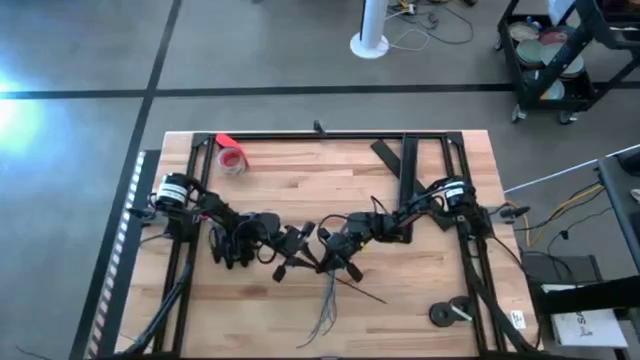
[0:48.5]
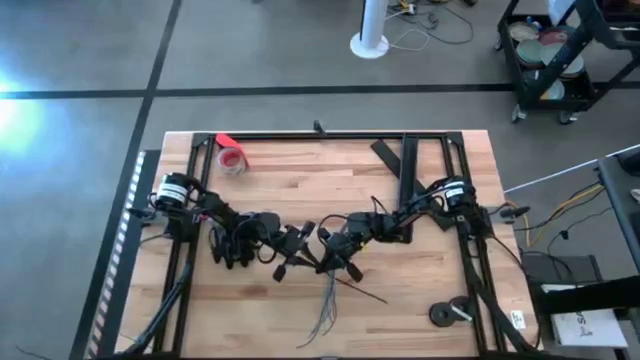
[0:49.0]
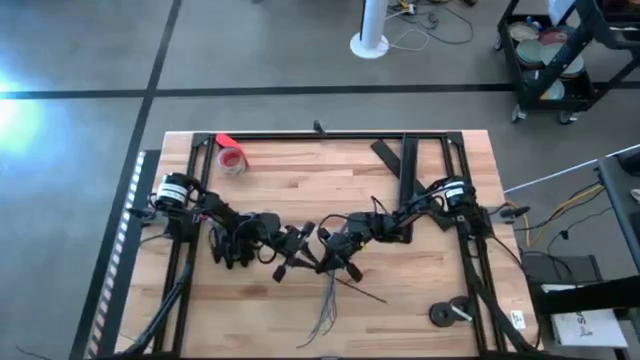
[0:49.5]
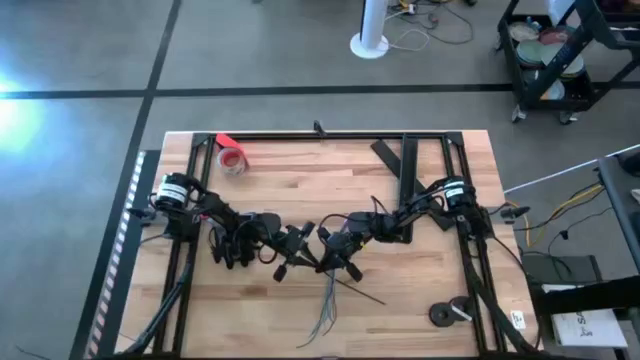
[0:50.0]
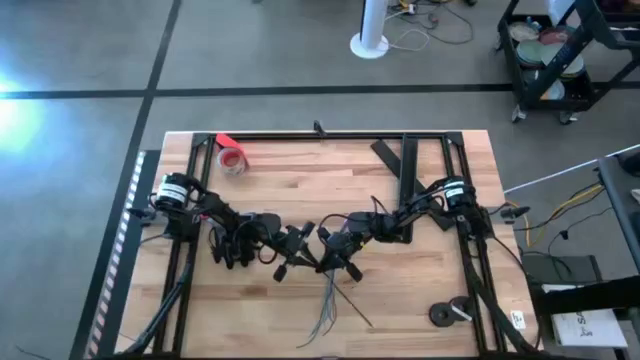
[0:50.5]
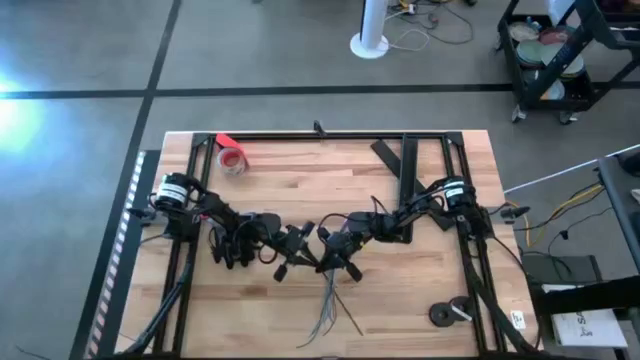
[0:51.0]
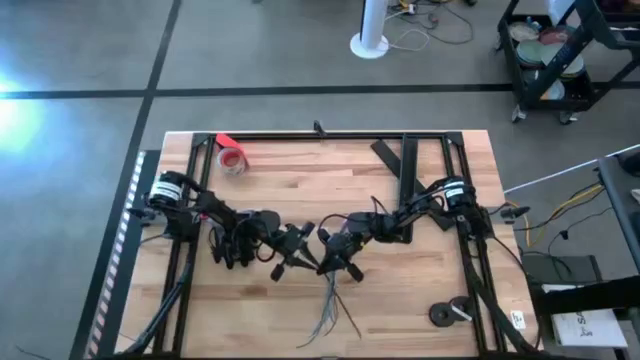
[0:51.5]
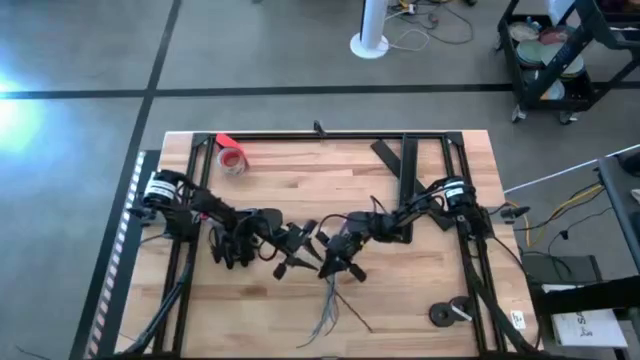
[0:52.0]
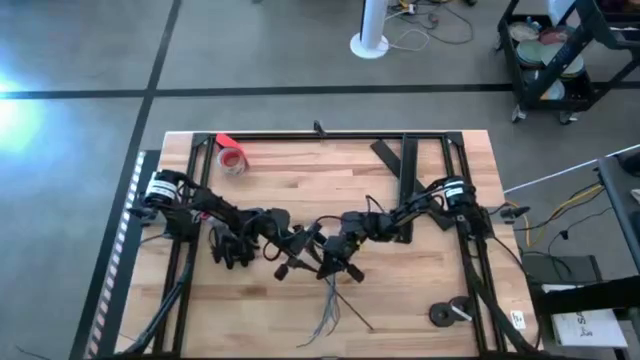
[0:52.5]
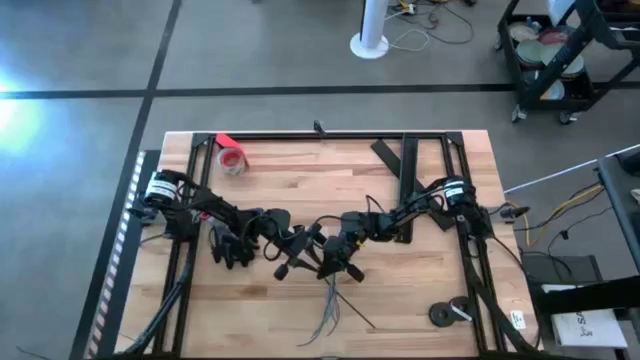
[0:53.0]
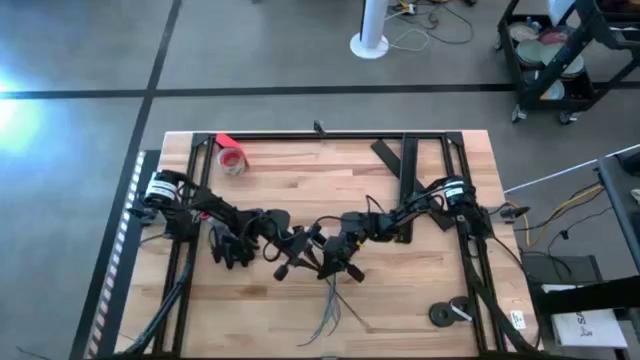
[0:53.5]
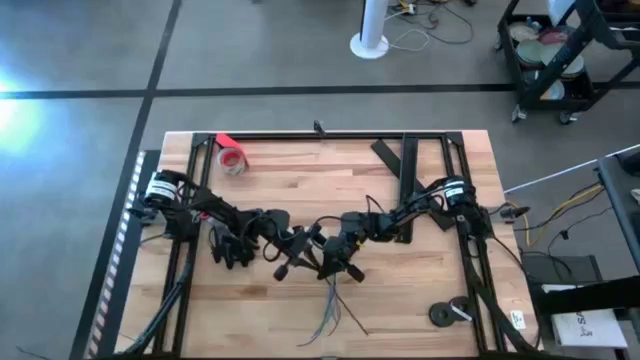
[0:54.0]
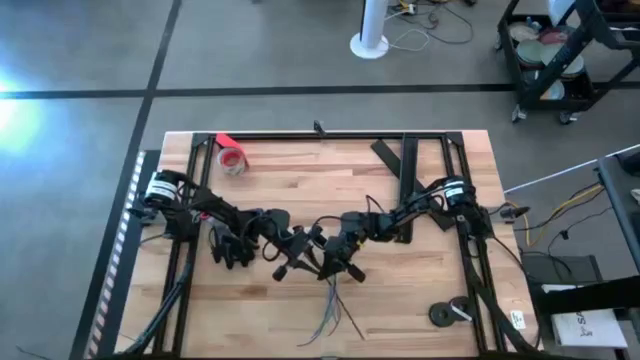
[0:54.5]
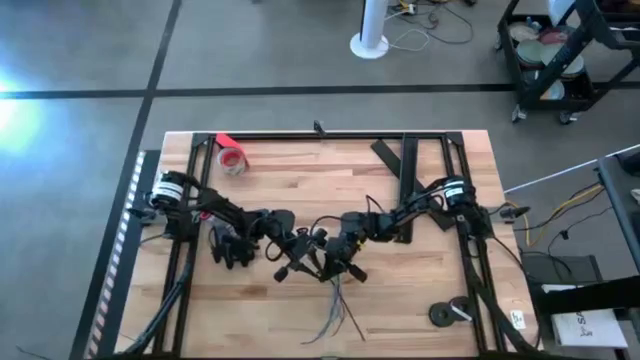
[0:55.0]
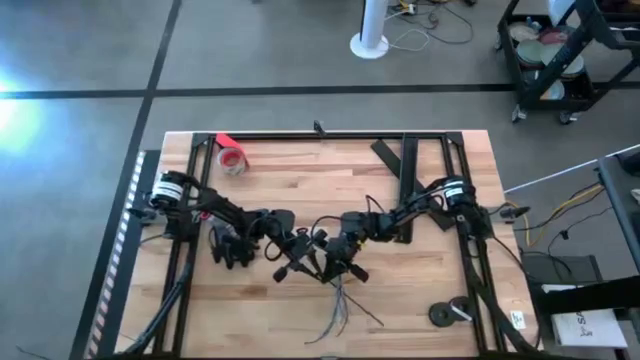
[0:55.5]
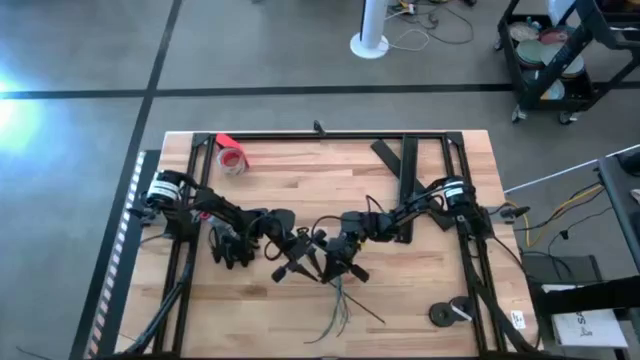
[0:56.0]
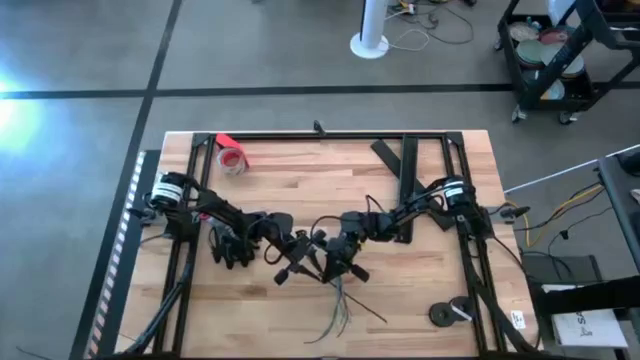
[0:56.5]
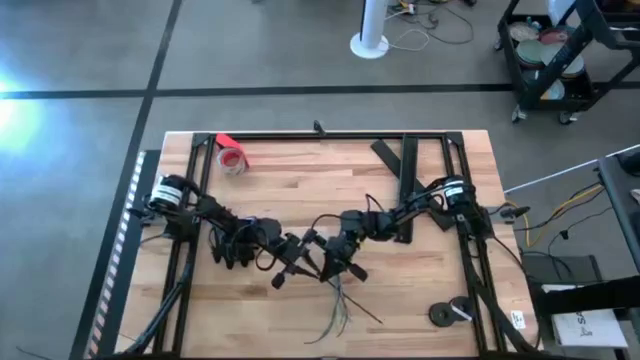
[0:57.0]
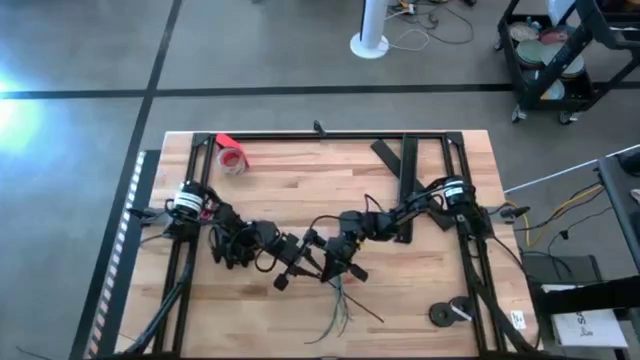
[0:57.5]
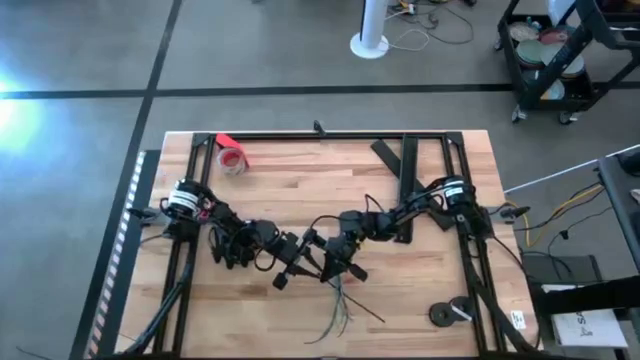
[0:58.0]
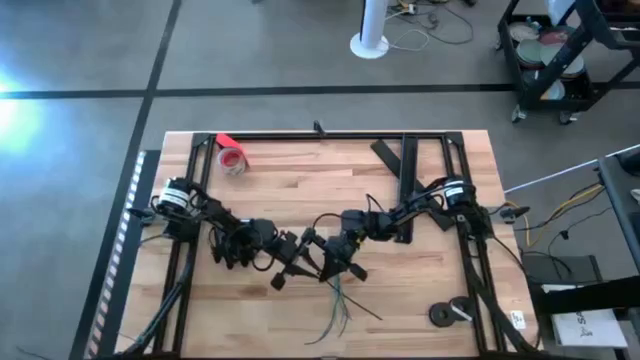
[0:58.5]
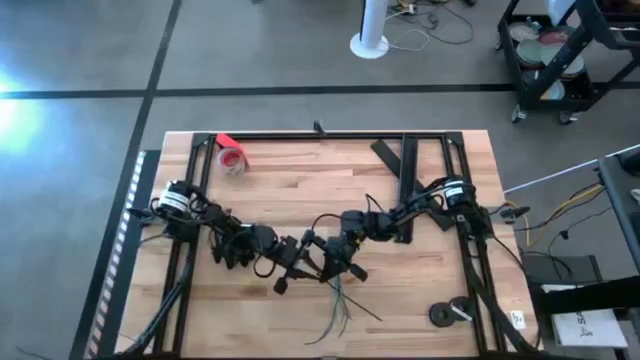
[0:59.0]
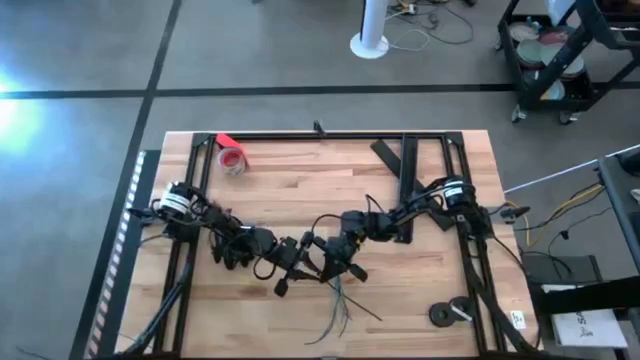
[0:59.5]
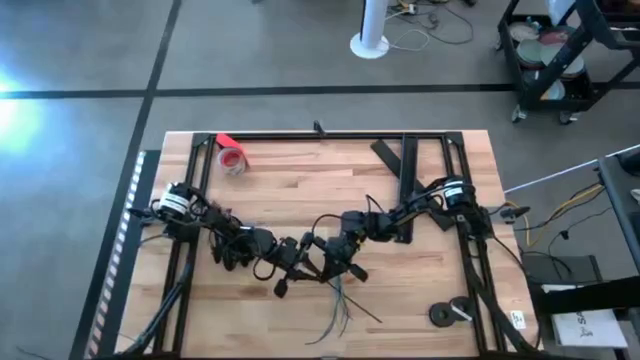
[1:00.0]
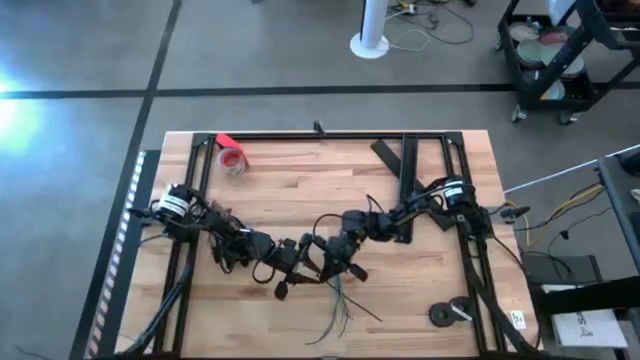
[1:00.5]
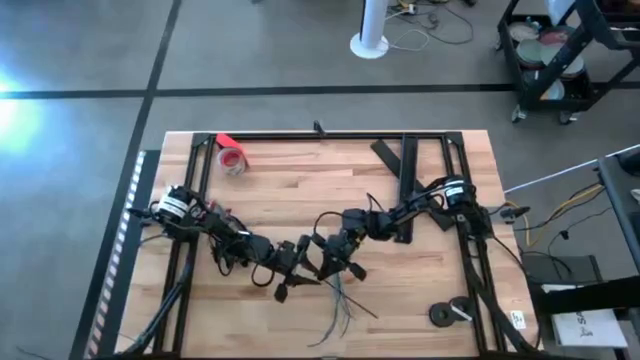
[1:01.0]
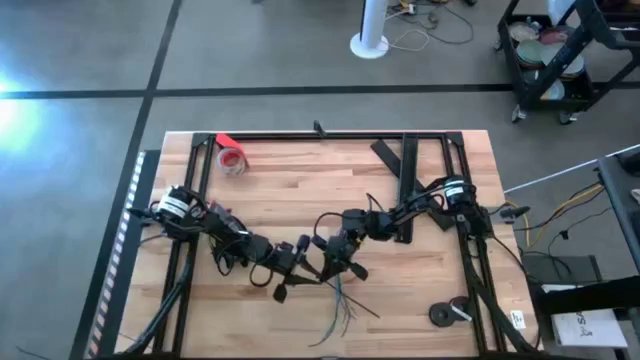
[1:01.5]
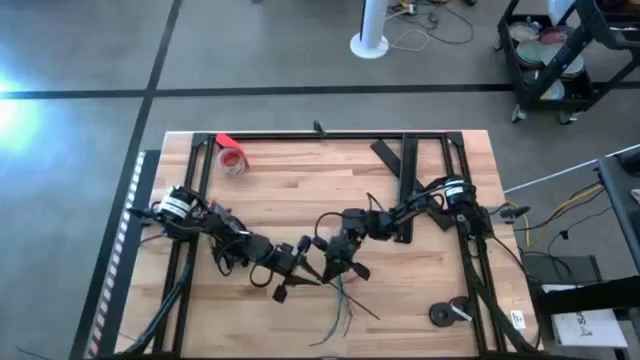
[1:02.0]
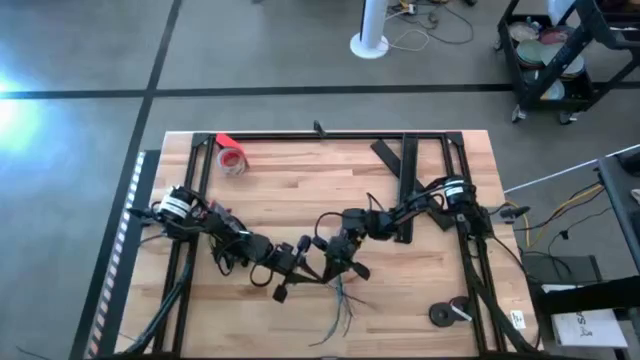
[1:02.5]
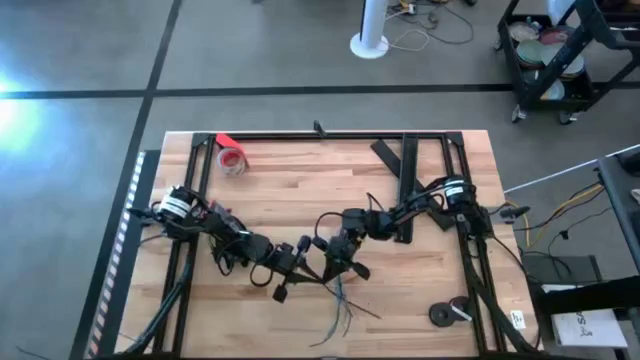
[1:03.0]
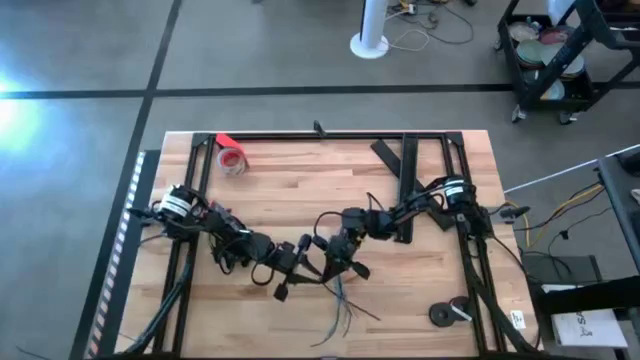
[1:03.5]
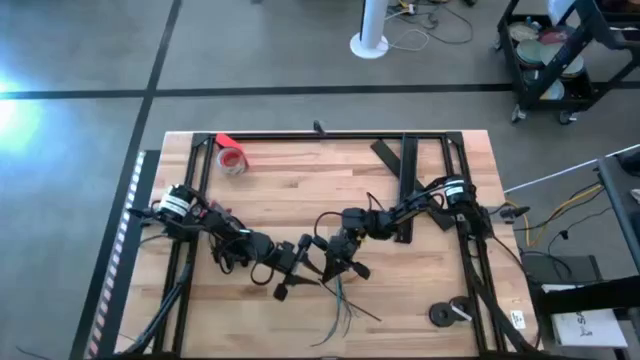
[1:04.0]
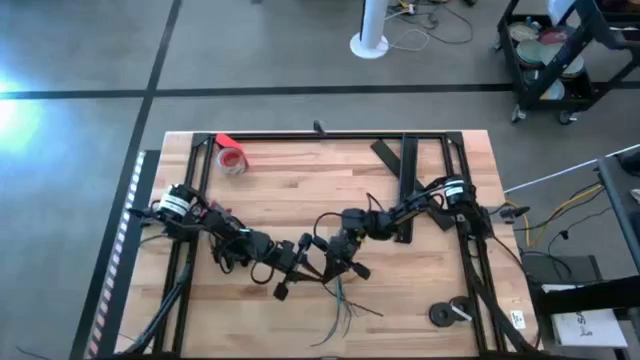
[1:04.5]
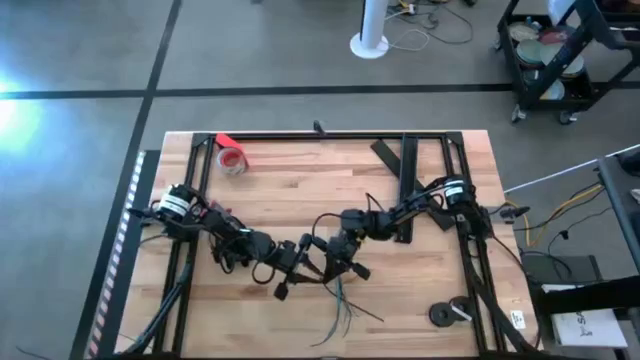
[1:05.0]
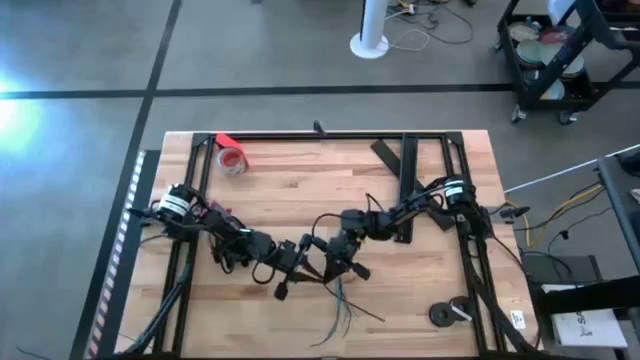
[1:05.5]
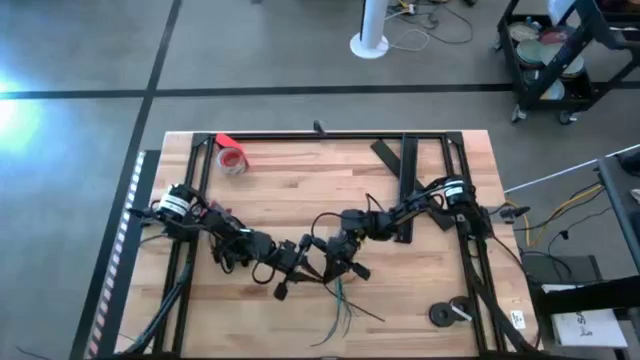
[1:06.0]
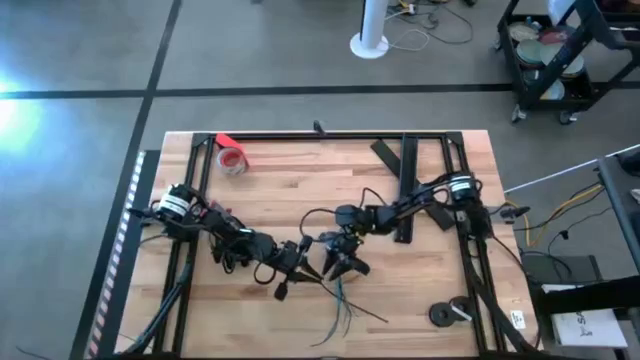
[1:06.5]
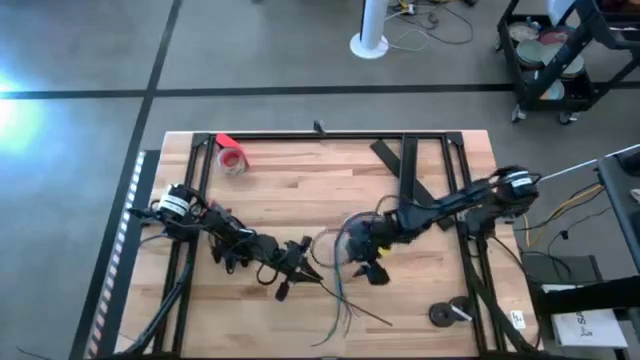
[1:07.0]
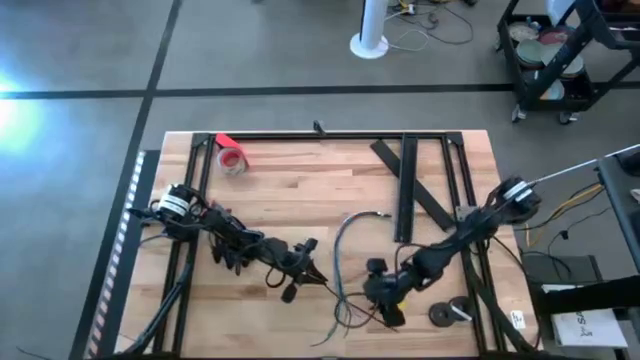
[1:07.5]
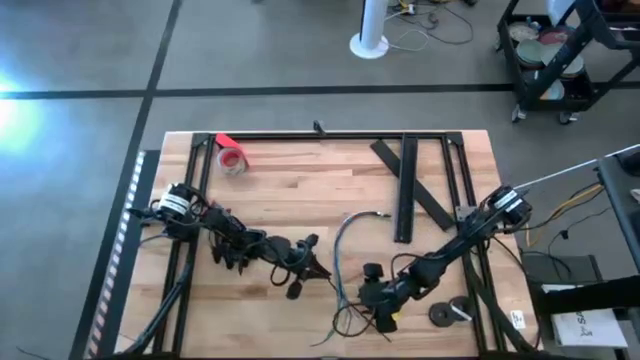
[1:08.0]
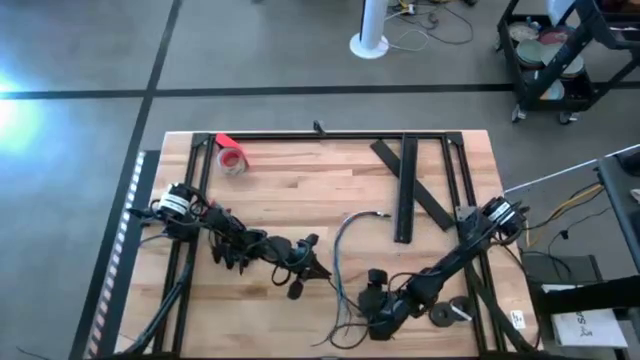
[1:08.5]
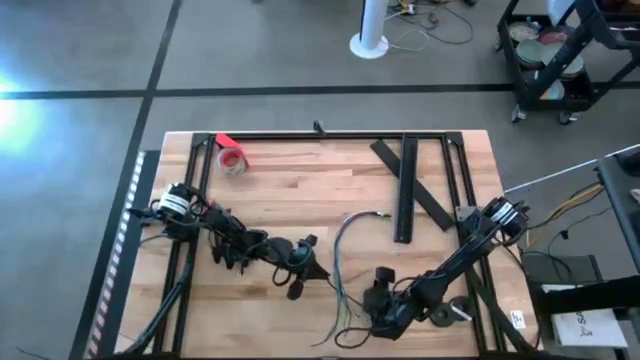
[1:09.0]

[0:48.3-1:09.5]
Task: Ziptie cables
Wrap the zip tie around the cable bundle
